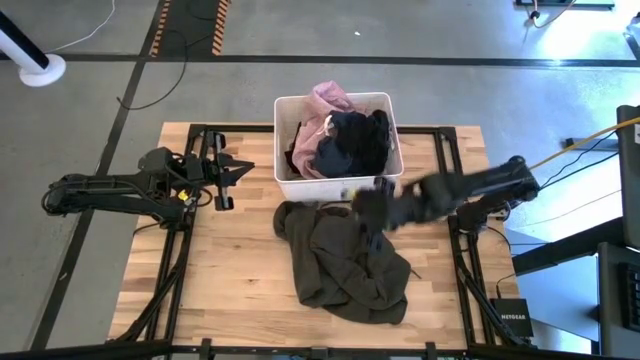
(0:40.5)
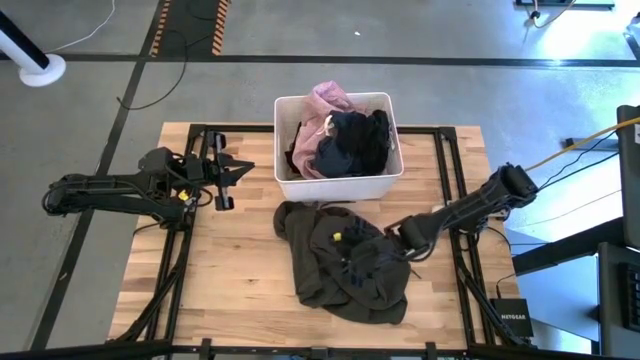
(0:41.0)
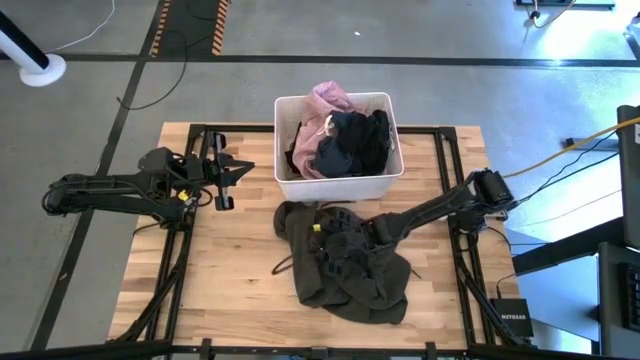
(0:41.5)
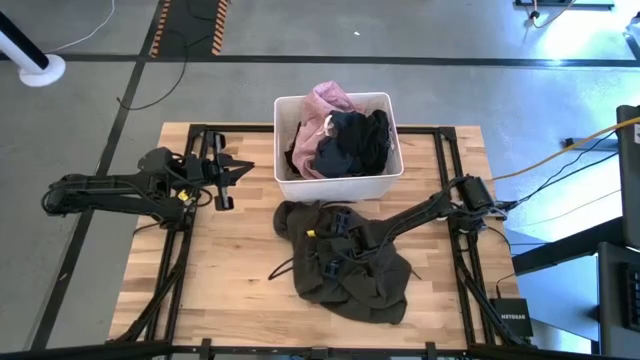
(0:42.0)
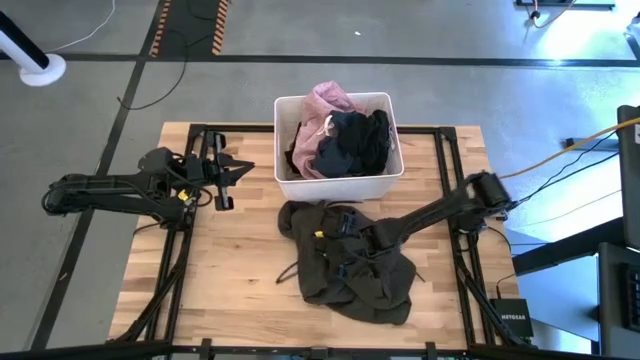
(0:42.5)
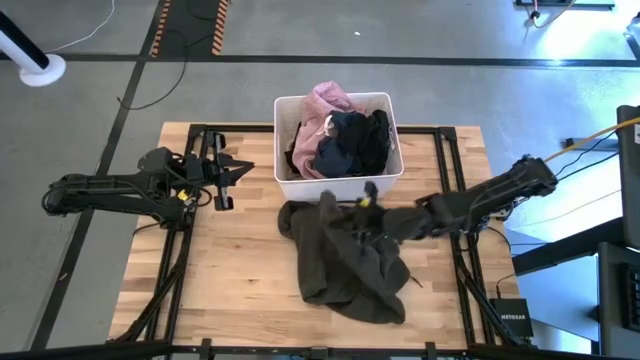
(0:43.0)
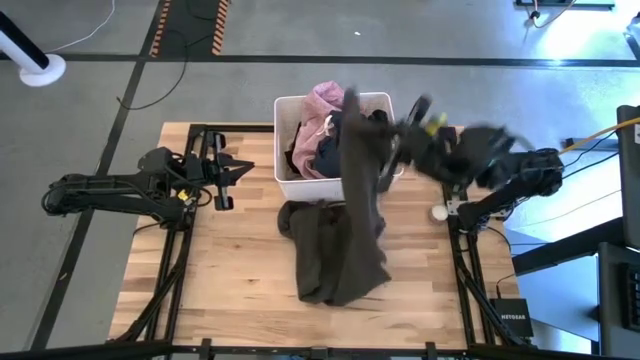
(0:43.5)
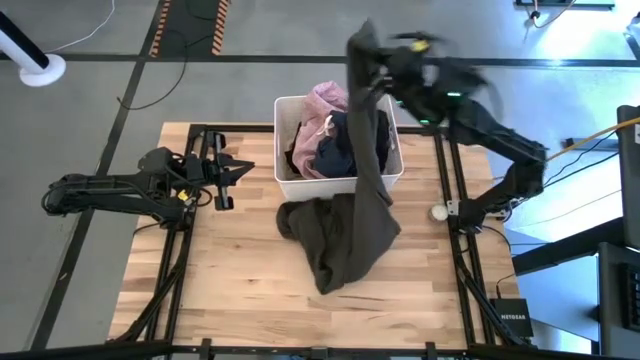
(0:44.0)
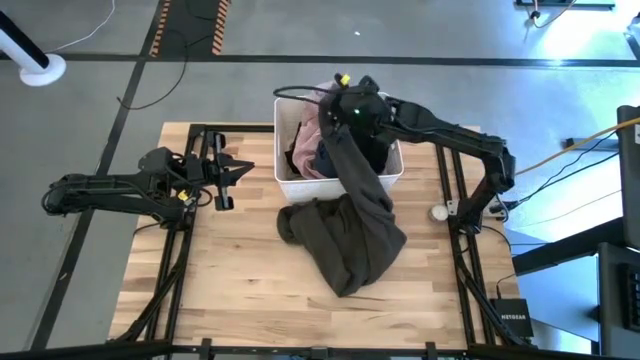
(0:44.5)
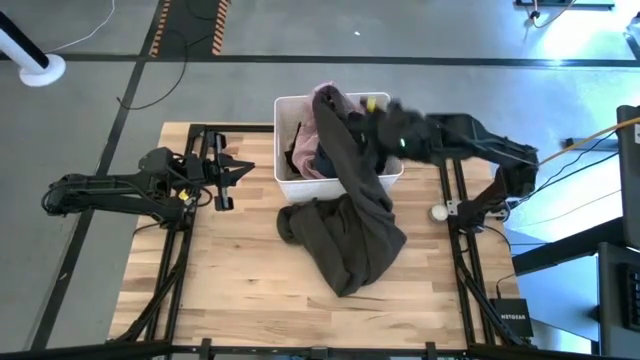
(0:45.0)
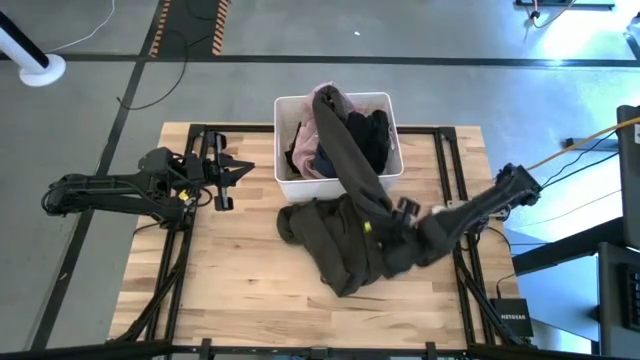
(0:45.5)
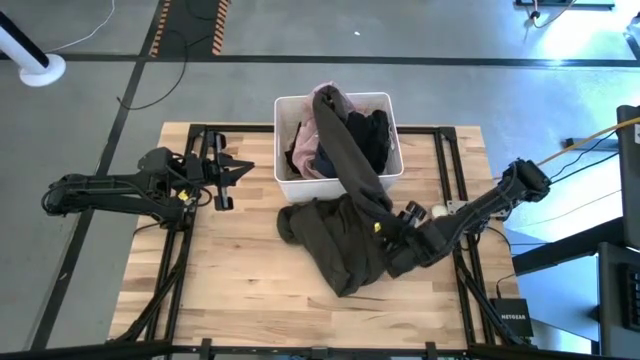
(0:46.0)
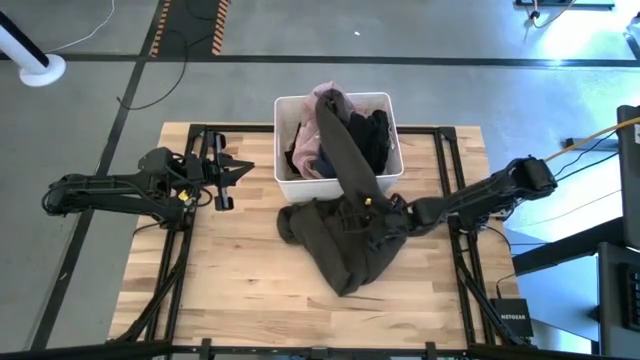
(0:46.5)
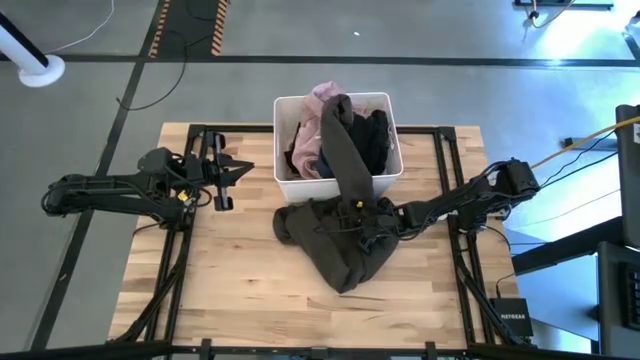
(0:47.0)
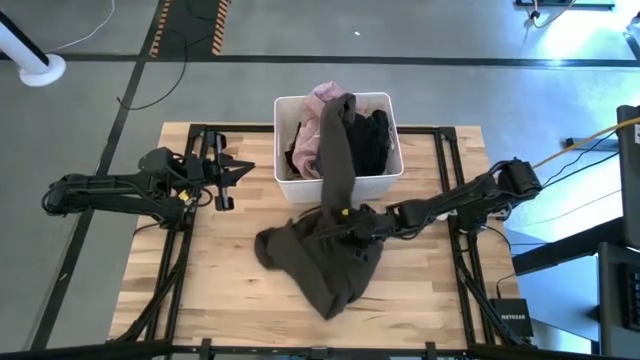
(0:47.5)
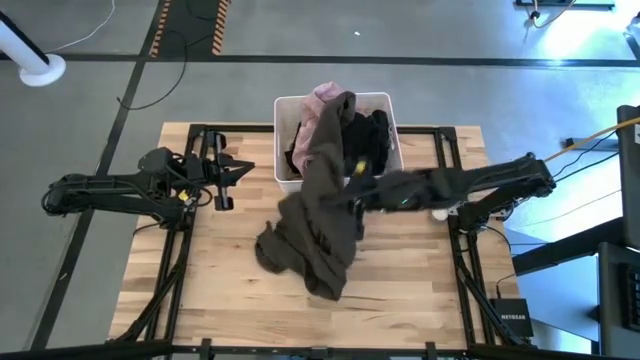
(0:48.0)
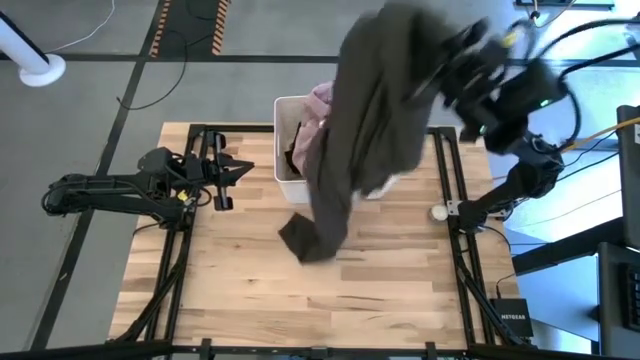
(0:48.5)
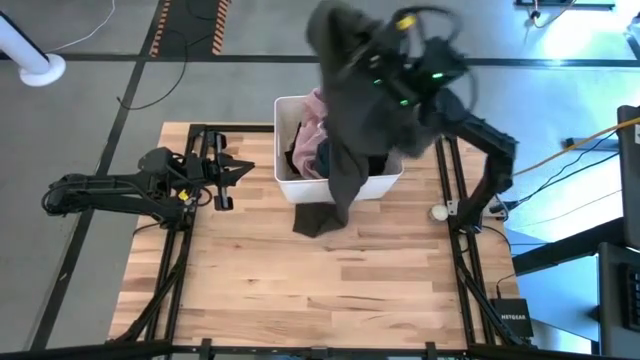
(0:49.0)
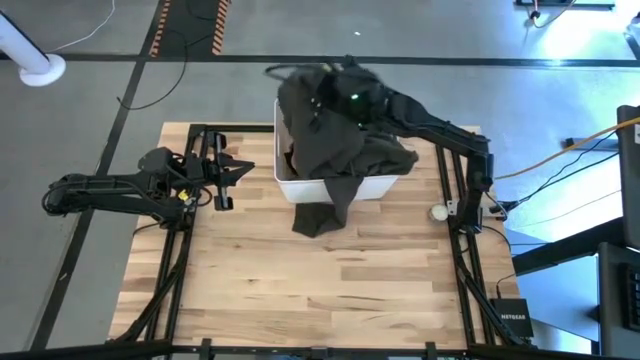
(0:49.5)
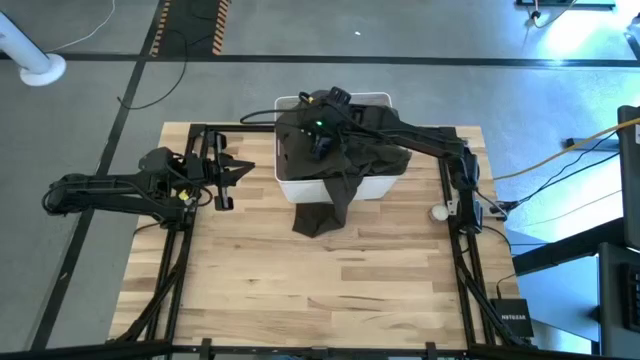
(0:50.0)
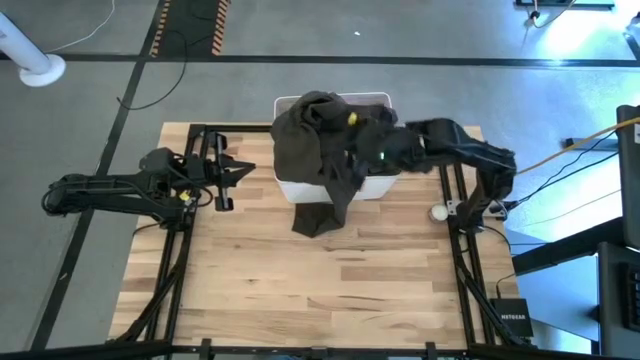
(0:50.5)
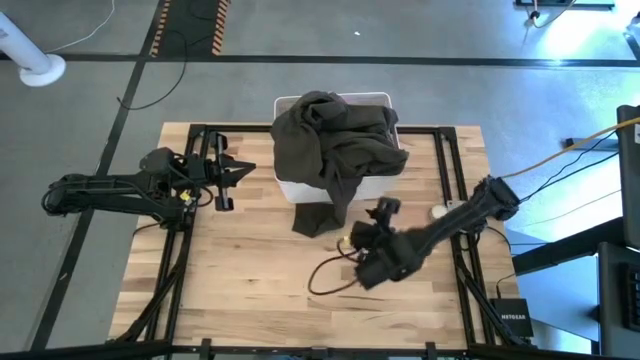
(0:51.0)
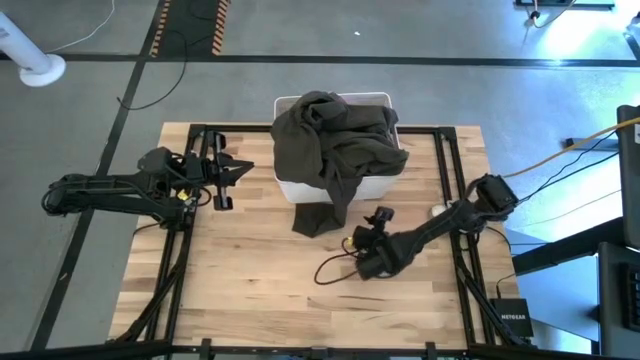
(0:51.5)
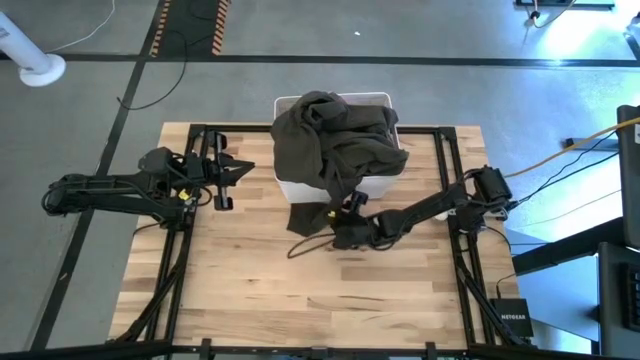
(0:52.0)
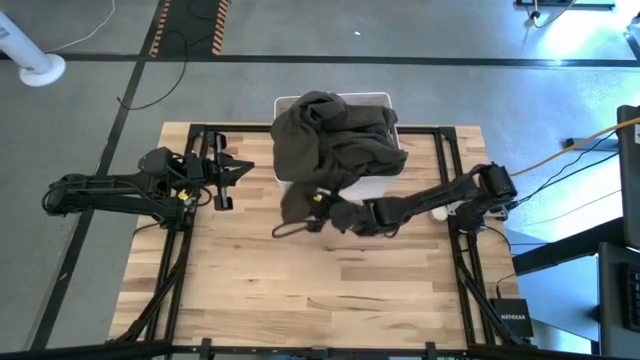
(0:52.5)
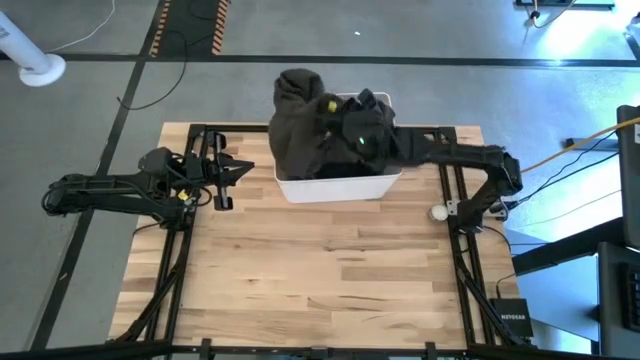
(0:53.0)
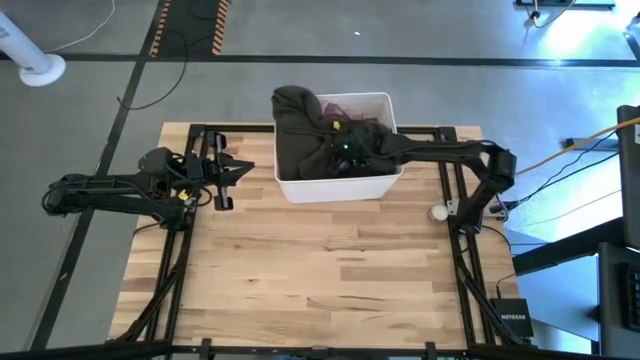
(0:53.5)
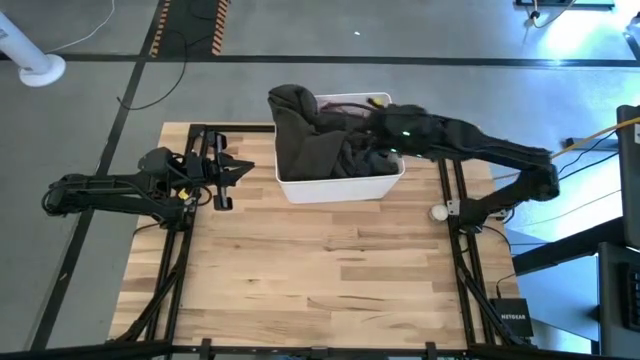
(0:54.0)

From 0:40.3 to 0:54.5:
Task: Sort clothes
Put the black hoodie into the white laundry bin

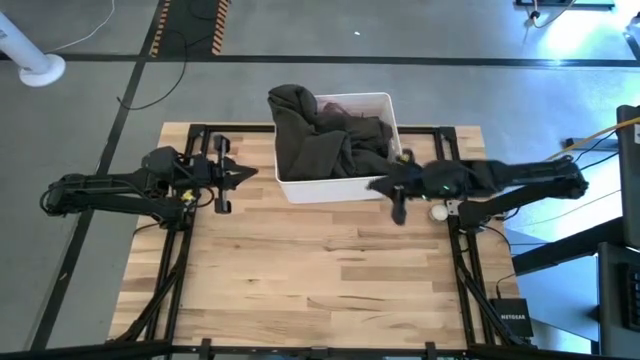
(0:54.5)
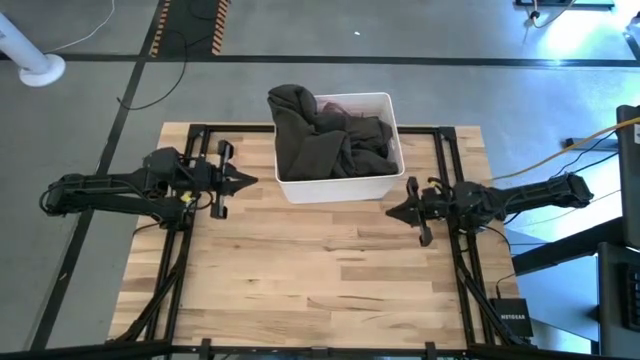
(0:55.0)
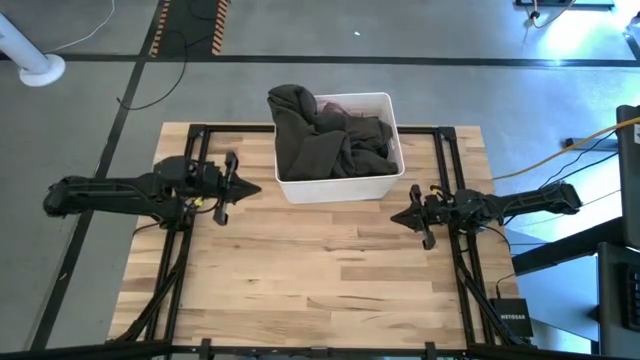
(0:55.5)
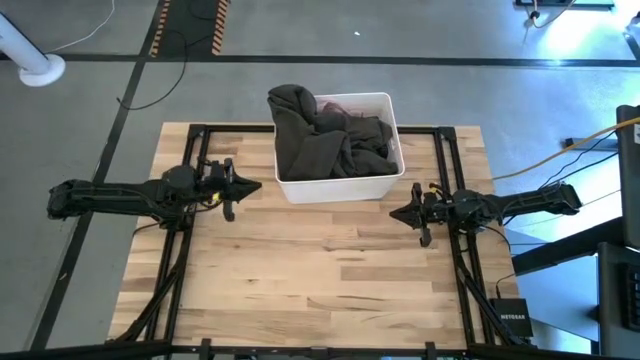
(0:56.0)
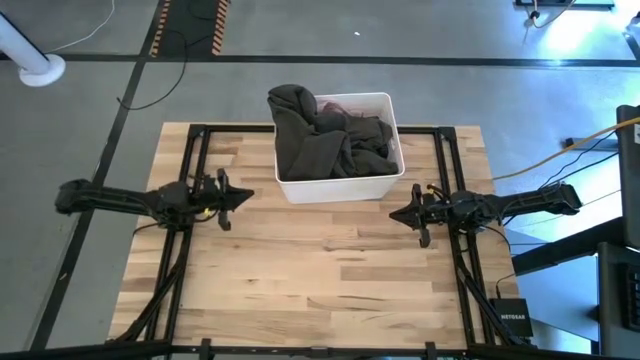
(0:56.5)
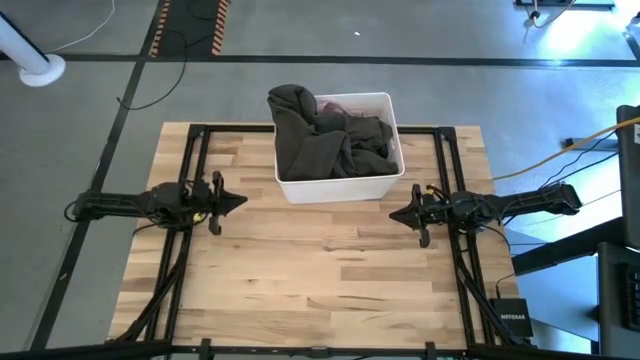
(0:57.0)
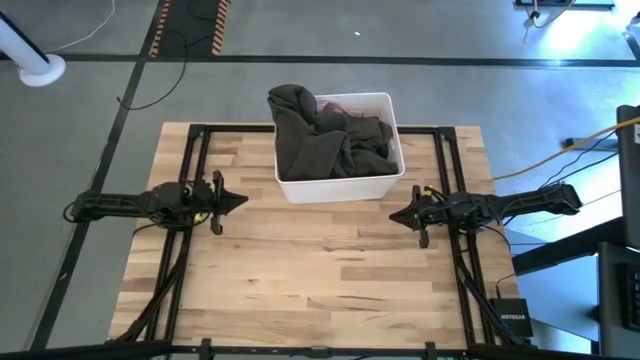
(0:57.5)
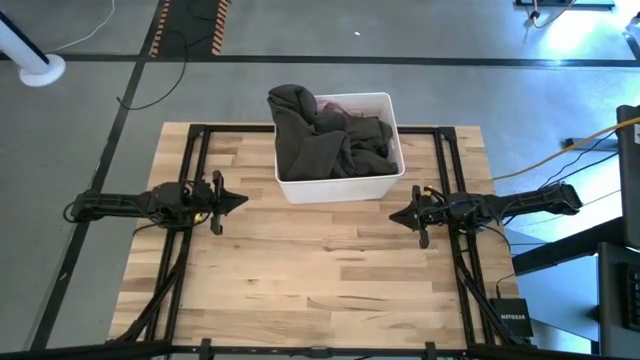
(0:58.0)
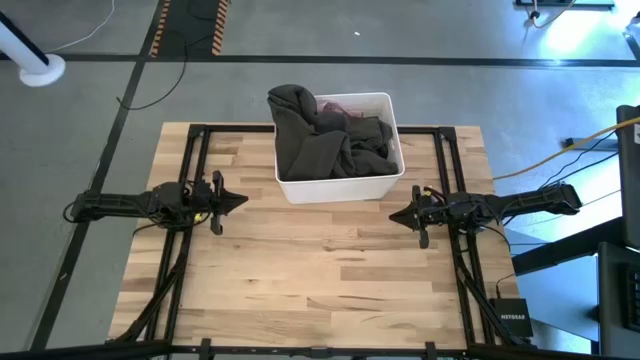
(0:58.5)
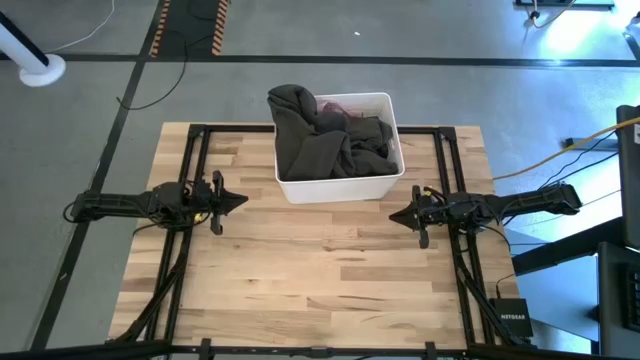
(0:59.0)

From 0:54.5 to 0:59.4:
Return to Home Position

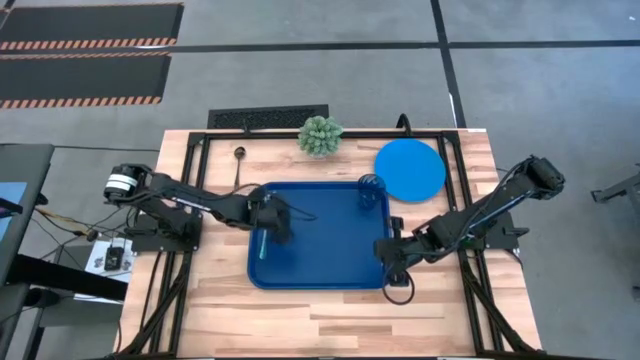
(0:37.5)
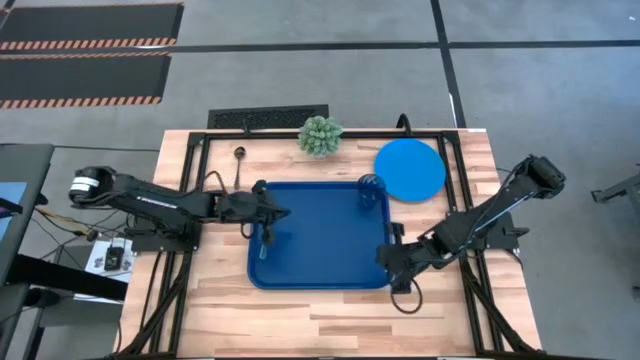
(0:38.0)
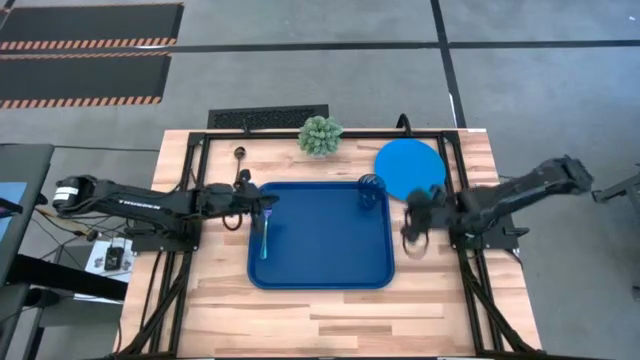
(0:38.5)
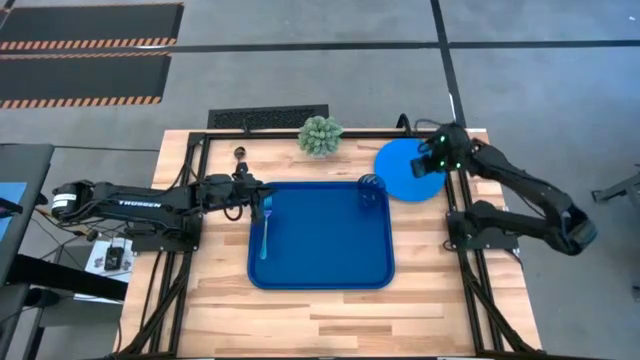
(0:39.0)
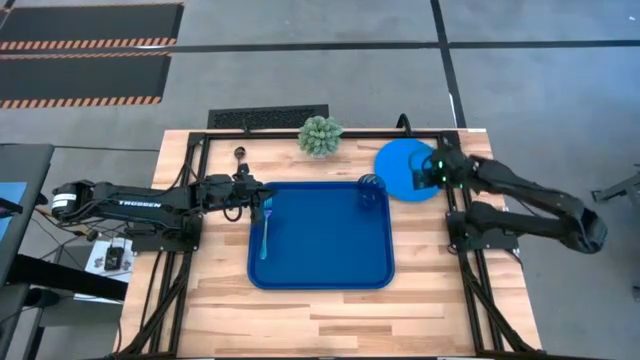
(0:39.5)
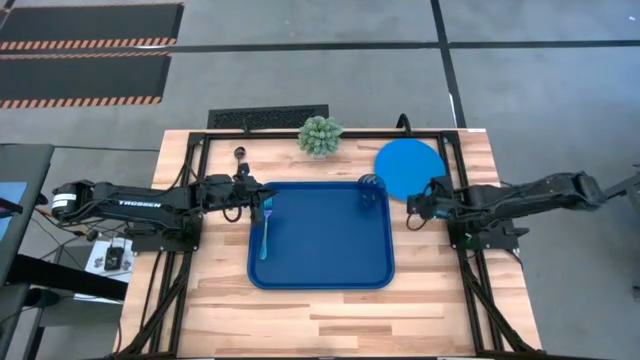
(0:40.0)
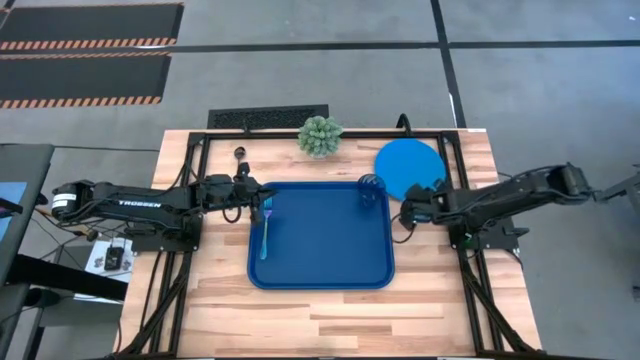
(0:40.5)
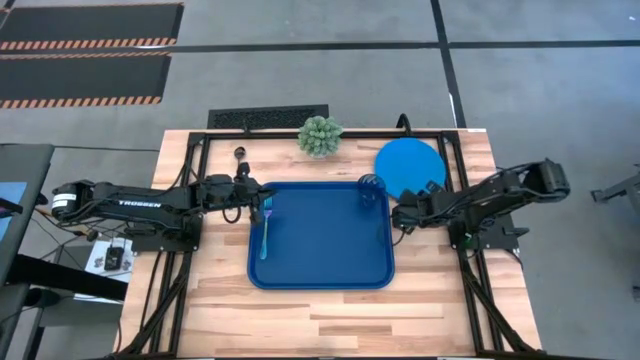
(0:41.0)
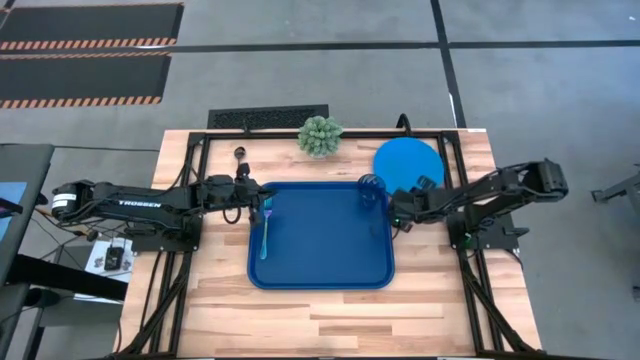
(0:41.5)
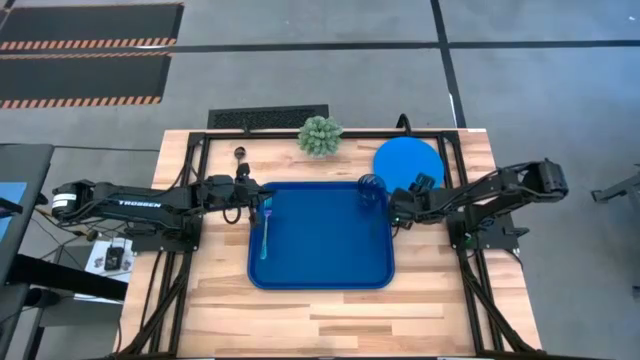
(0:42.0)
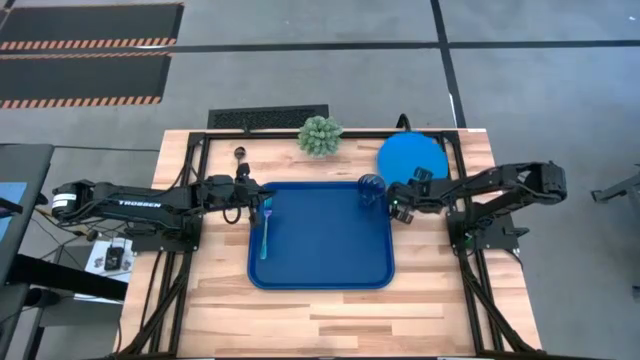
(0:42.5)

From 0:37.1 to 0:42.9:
Task: Pick and place plate/cup/fork/spoon on tray
Put the blue plate to the right of the fork on the blue serving tray
